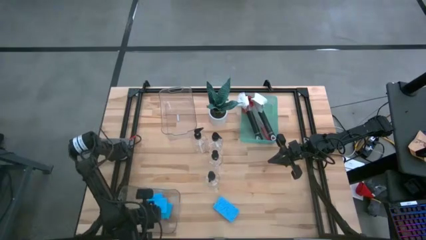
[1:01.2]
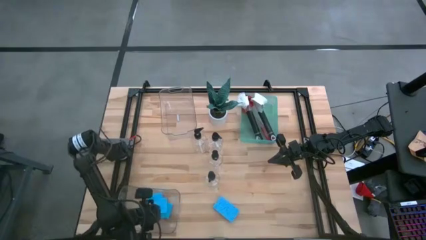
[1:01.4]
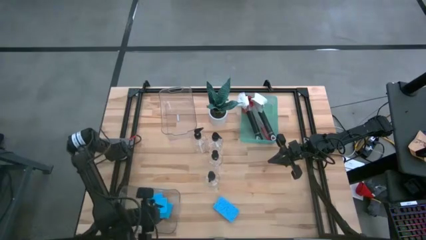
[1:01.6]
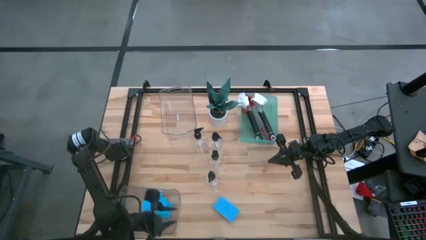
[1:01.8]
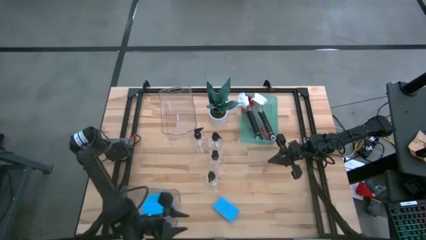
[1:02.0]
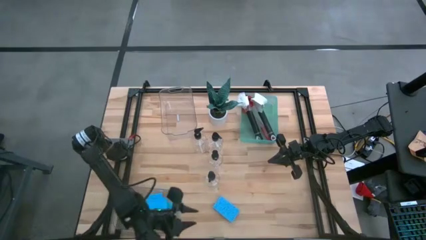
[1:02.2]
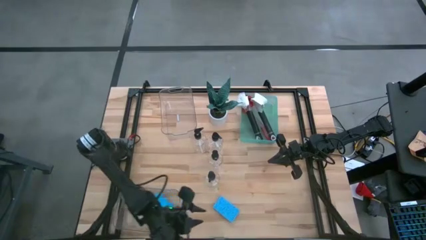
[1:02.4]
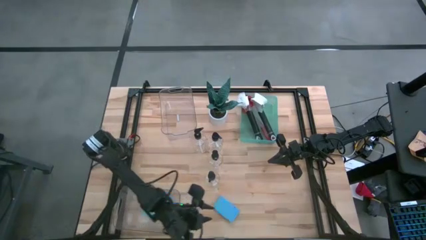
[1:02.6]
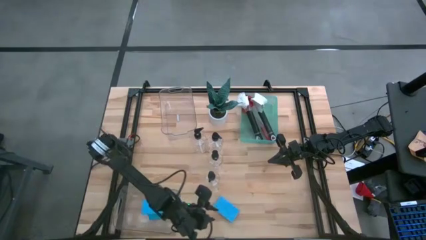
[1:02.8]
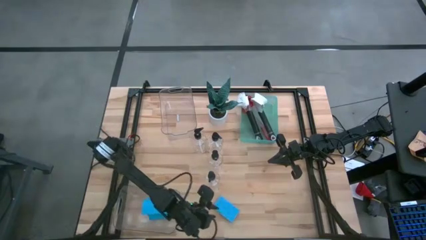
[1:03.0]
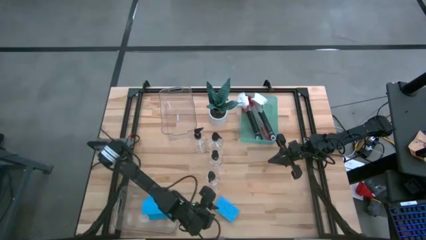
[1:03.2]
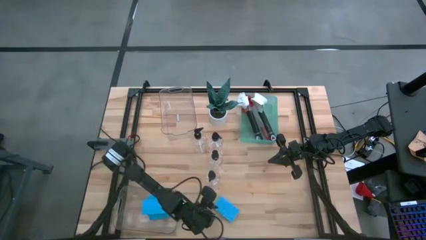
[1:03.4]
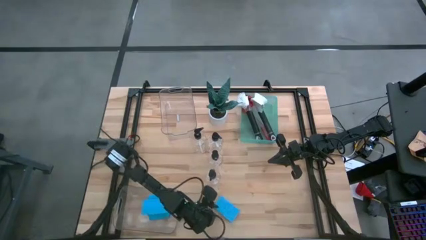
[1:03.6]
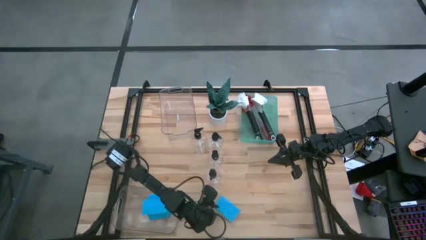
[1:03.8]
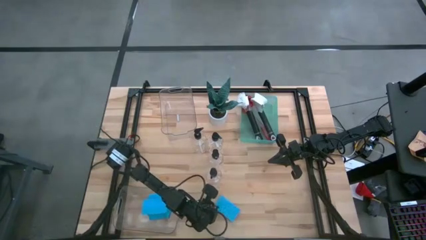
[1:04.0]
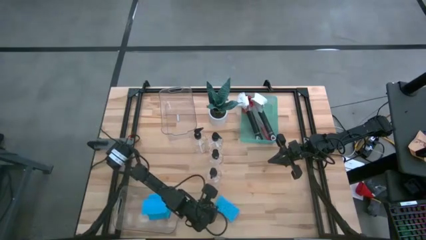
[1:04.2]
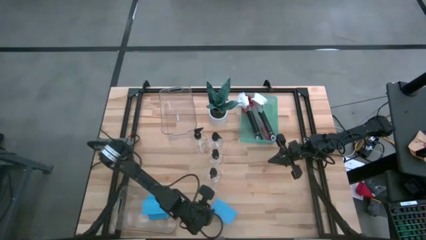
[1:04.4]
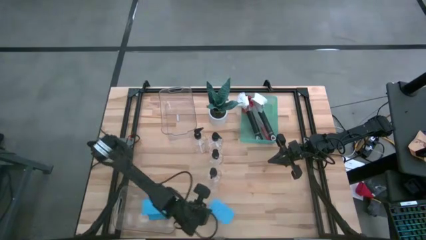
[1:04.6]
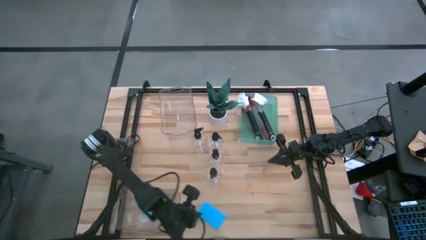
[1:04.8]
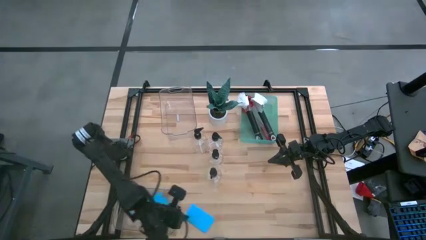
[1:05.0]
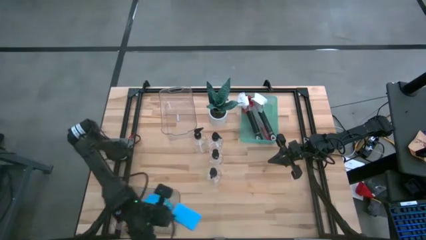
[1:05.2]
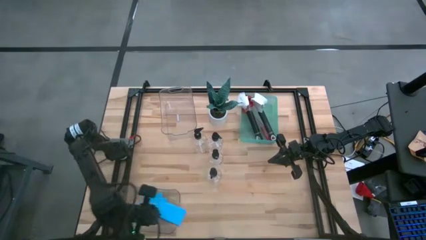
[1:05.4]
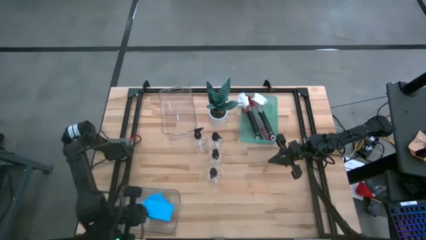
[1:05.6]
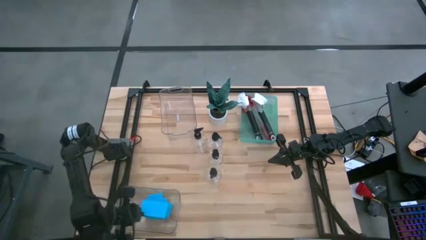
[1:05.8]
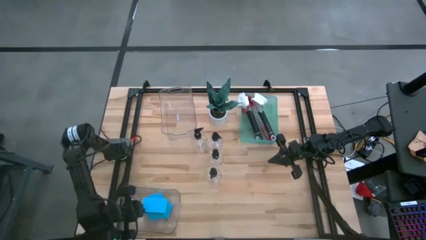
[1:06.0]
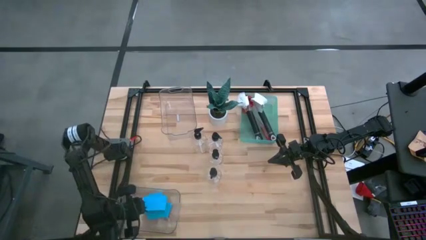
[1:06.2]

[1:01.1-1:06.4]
Task: Pick & Place Kitchen Sink Supplies
Put the blue sponge into the bottom transparent bin

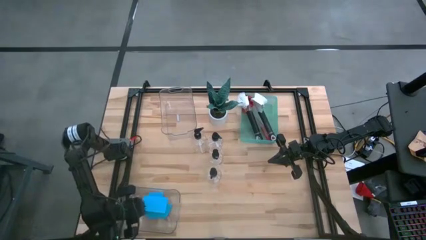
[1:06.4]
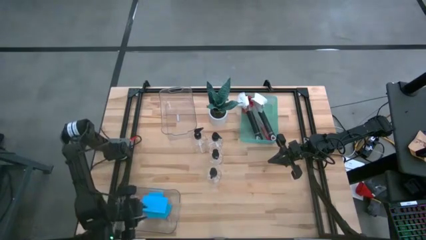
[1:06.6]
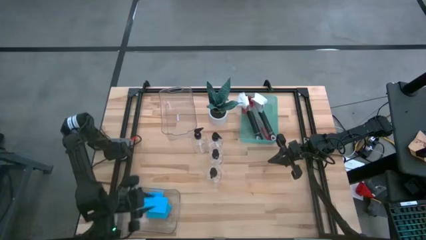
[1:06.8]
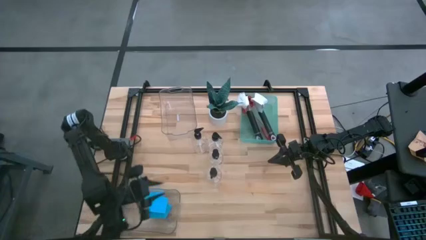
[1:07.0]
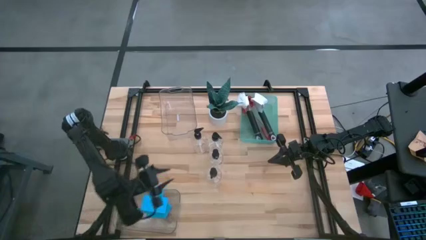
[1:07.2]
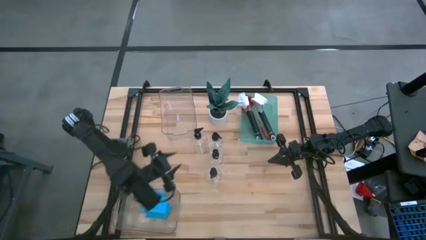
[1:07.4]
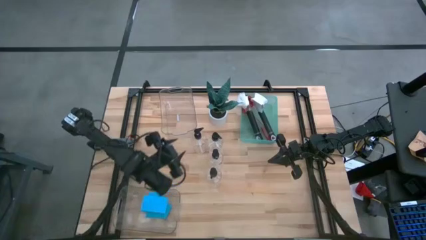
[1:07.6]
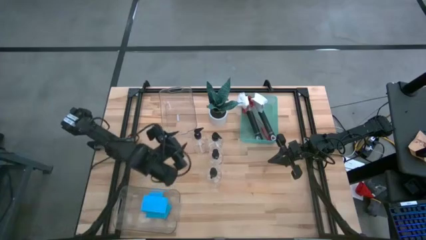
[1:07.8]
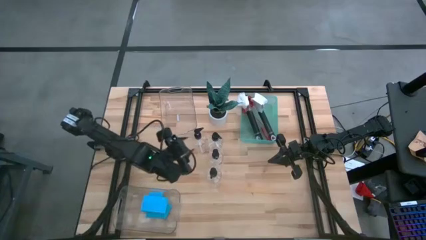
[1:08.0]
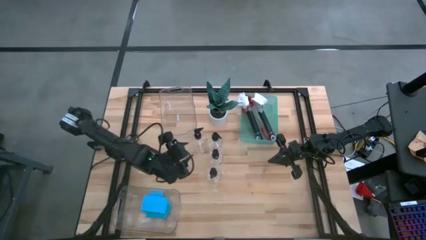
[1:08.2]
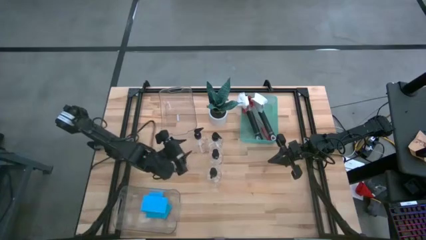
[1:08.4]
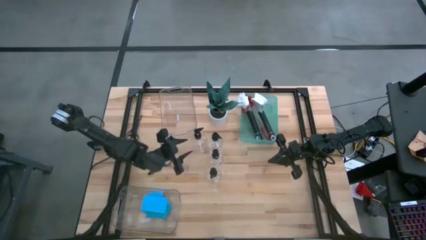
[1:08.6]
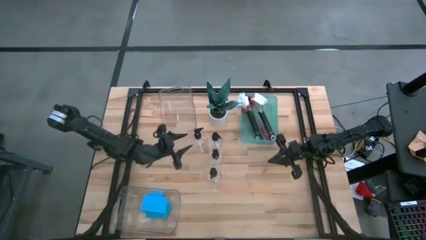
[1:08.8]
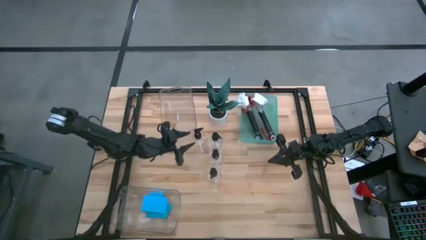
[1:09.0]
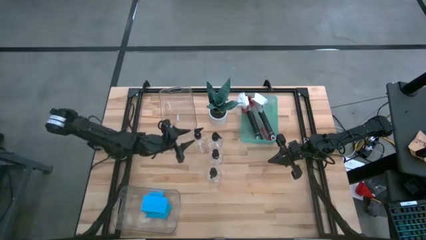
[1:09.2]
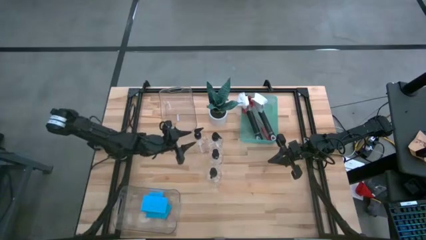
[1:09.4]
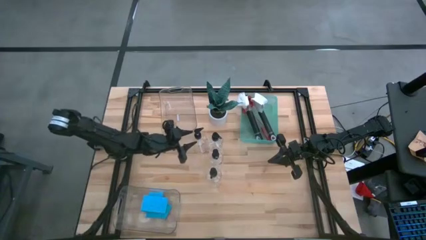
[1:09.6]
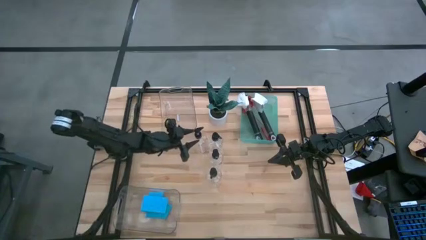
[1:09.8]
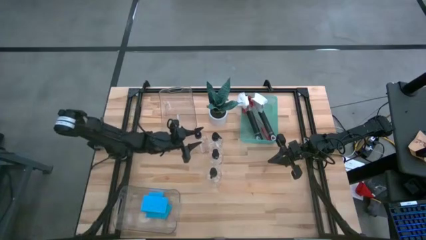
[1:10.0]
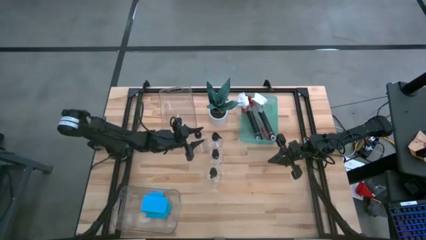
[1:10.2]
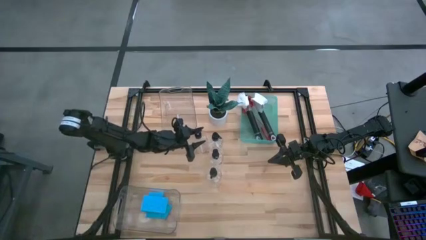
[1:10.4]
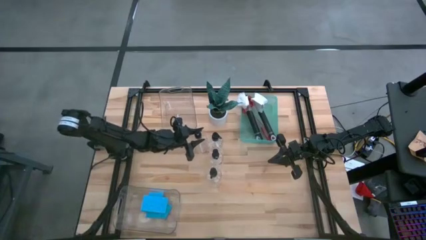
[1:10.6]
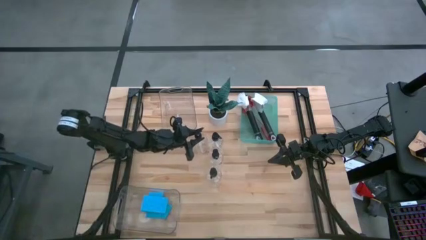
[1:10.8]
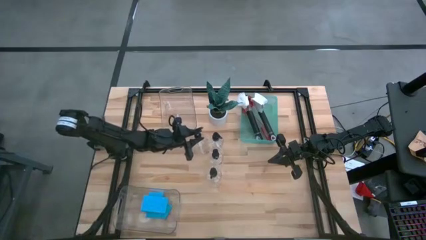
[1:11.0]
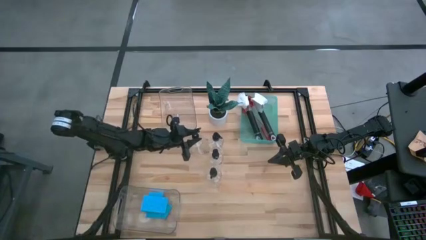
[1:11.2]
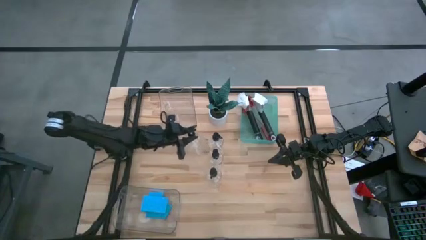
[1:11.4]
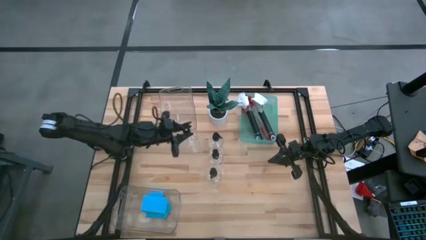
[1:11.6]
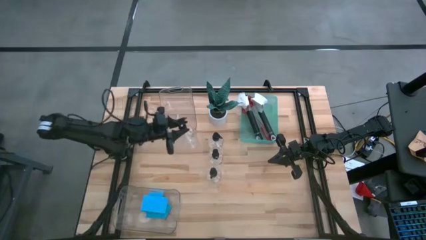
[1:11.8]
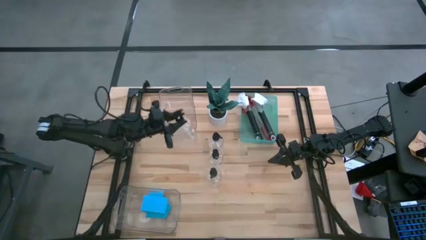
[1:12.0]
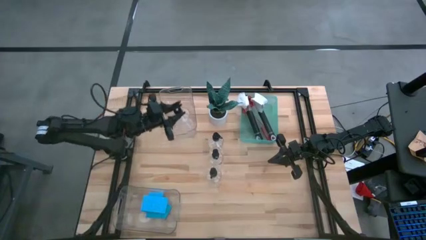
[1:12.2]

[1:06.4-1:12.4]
Put the black soap dispenser into the top transparent bin

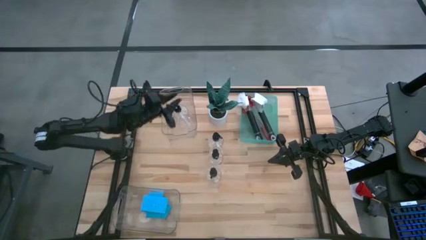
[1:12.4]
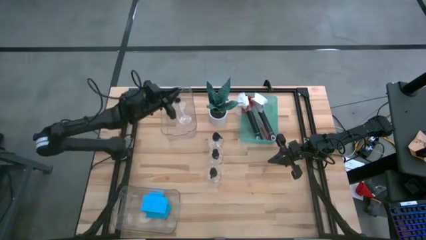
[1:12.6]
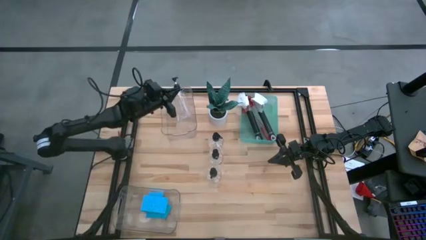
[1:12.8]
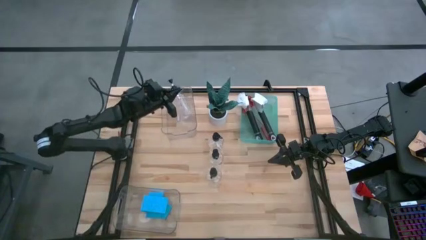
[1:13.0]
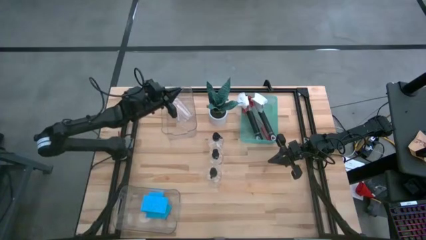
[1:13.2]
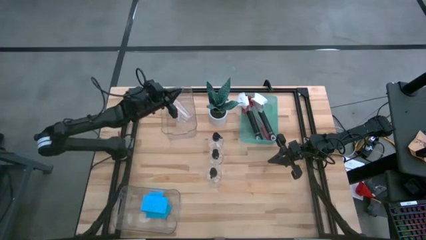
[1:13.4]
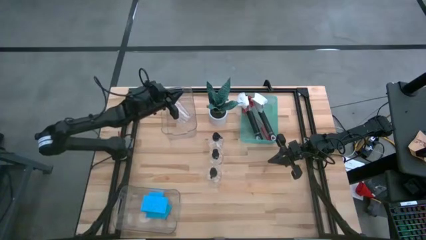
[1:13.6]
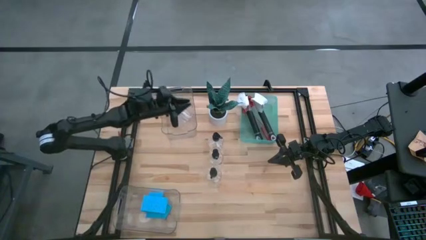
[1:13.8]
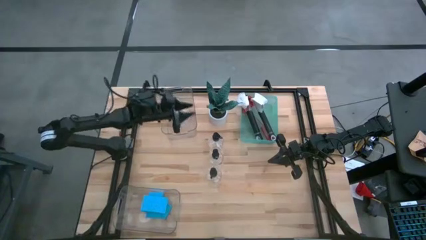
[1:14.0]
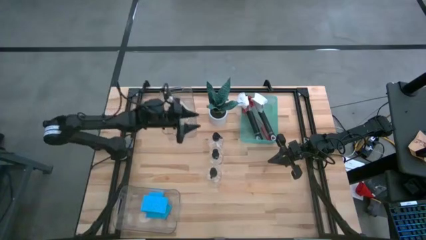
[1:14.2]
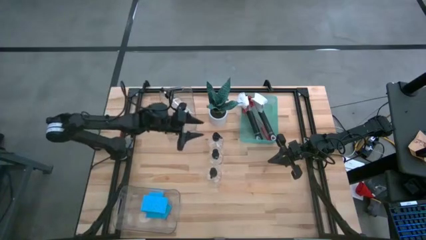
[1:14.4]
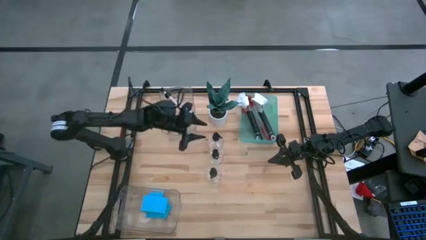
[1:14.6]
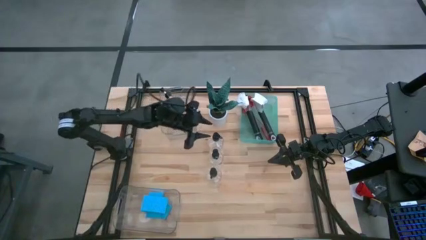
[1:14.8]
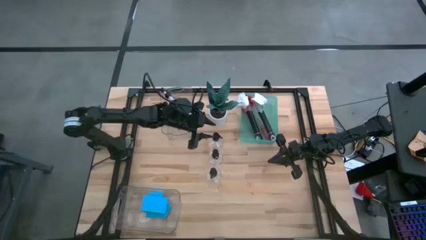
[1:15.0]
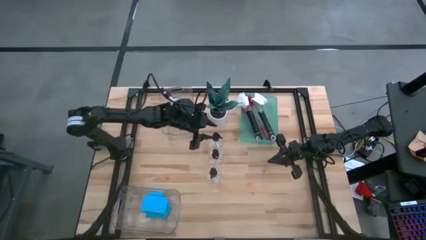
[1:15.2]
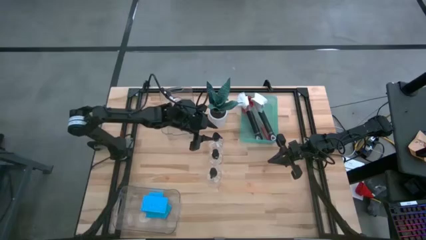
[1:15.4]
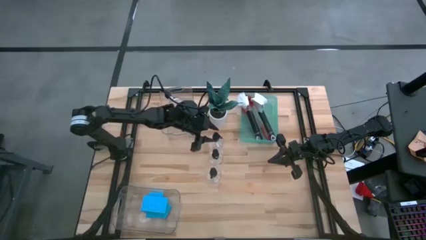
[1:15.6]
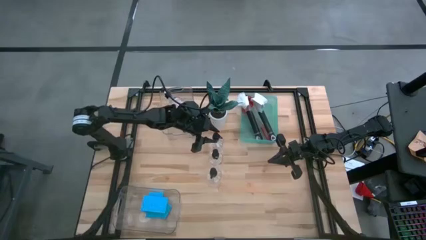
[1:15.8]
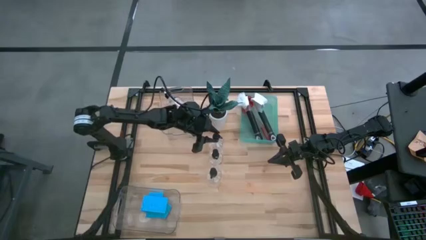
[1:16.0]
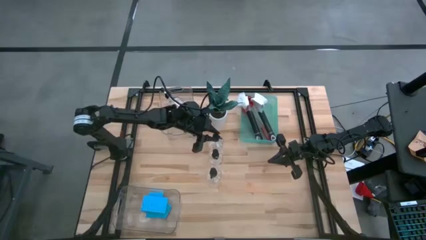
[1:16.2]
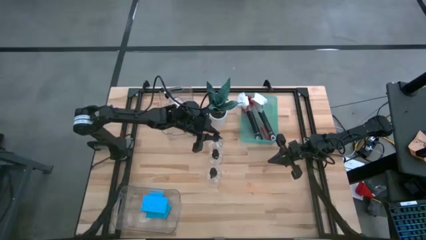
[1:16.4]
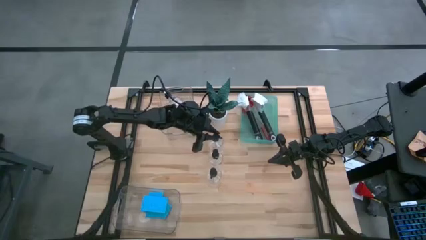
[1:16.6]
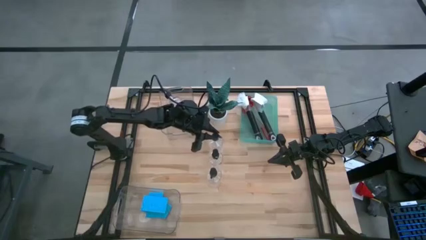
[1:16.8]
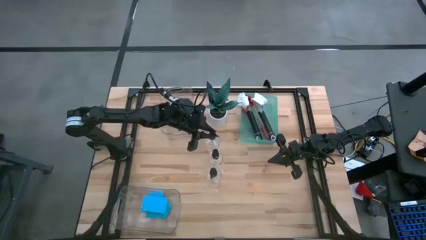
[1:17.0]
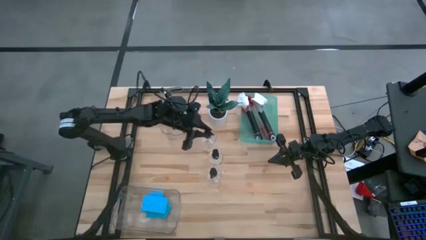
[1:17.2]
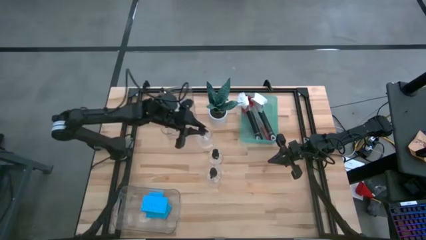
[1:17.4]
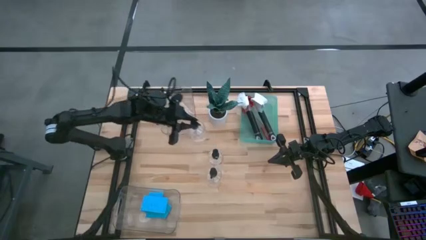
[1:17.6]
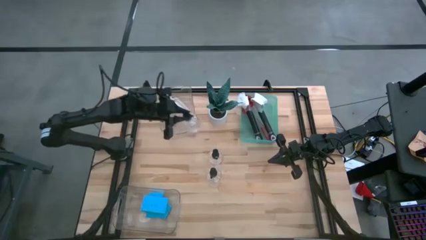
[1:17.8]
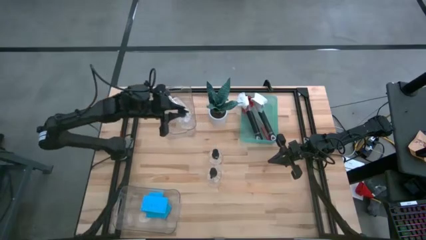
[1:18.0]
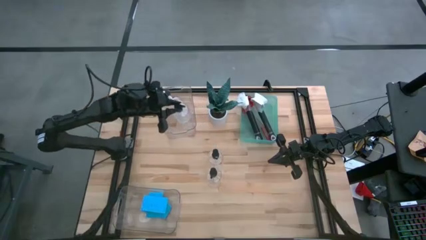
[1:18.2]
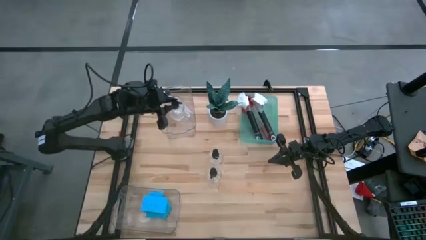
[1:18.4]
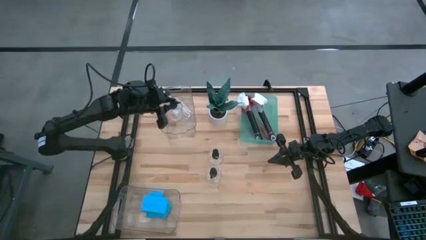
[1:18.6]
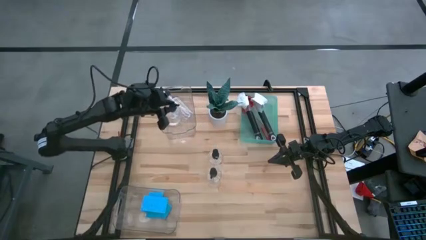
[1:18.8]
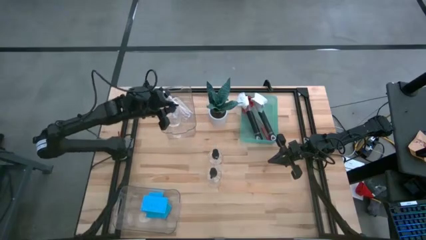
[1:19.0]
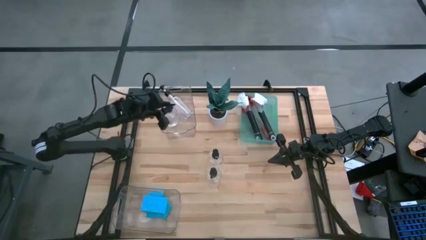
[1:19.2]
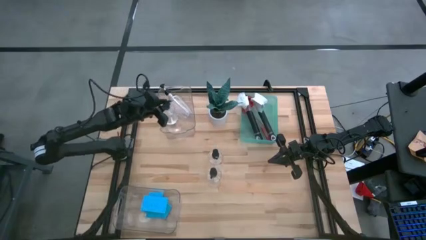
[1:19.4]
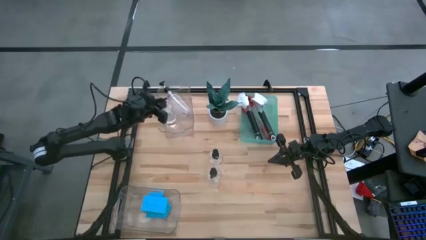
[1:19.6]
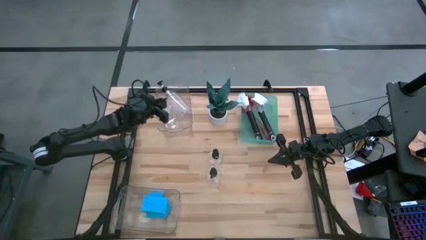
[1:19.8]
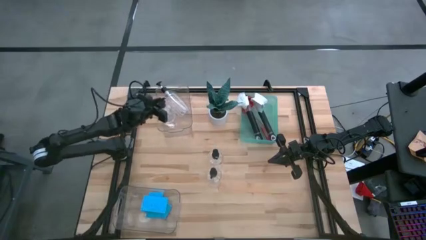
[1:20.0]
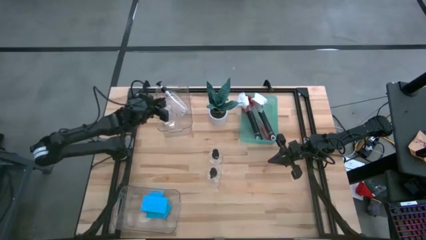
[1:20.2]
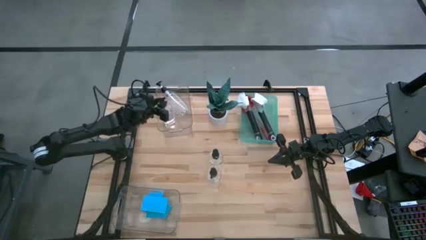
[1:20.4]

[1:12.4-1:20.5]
Put the black soap dispenser into the top transparent bin
